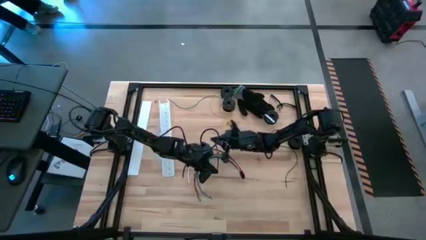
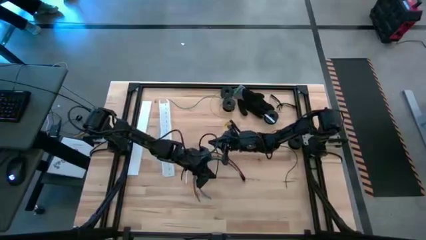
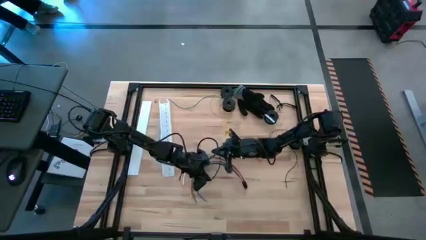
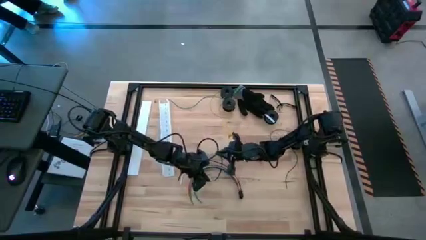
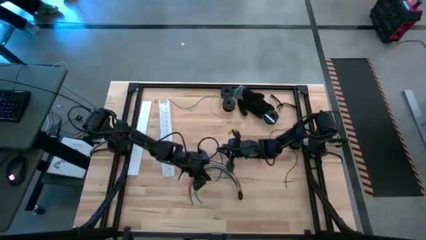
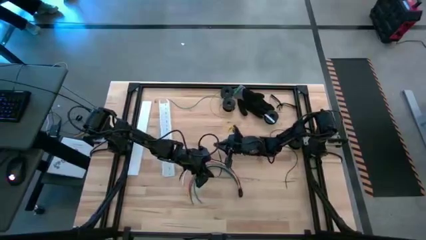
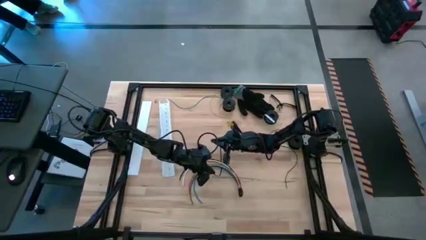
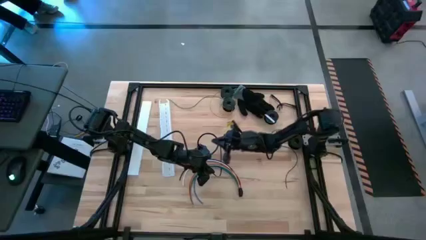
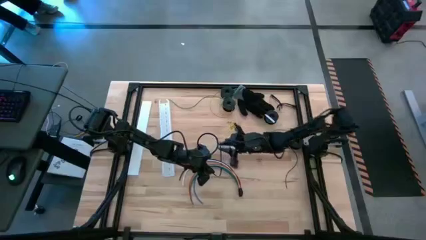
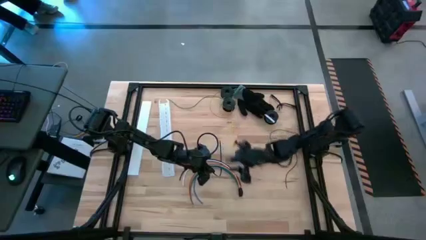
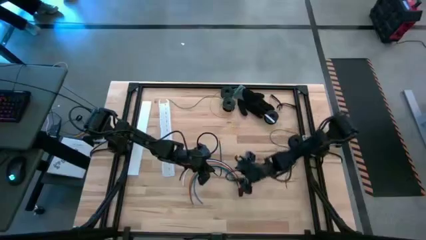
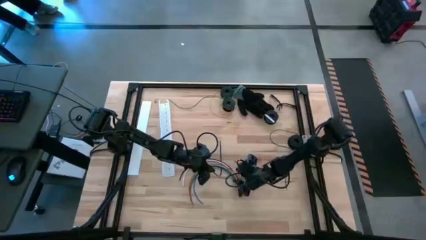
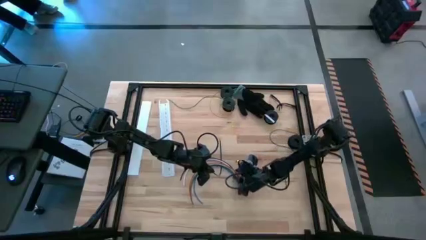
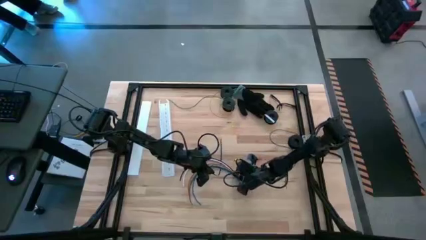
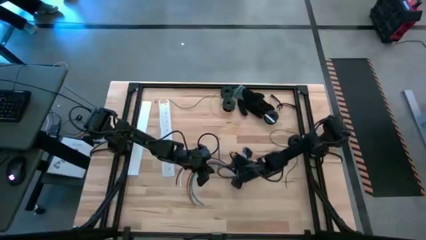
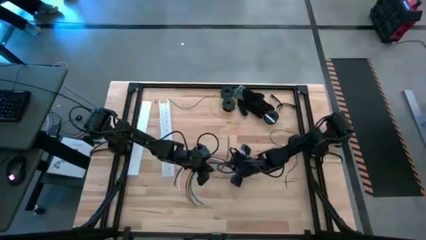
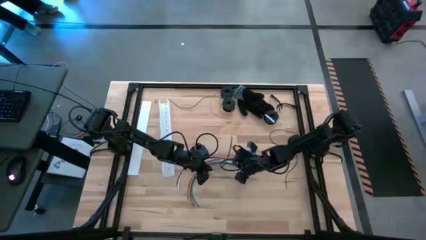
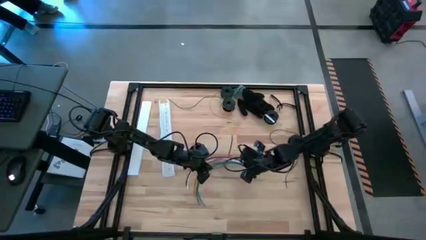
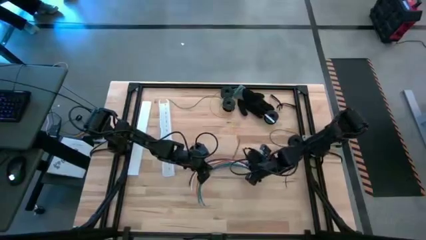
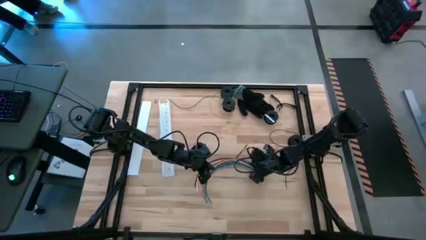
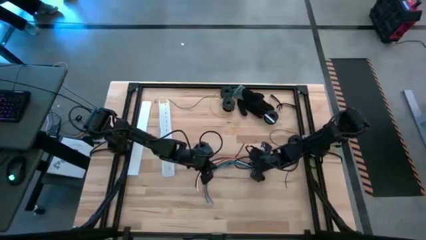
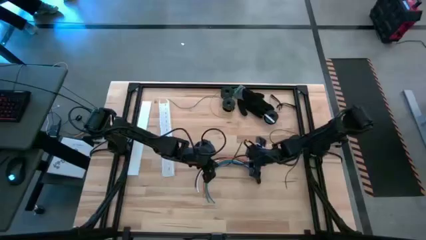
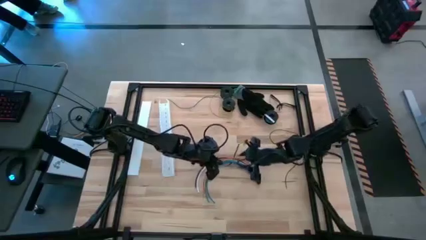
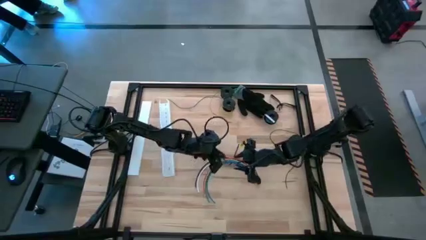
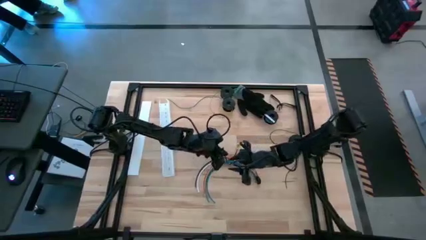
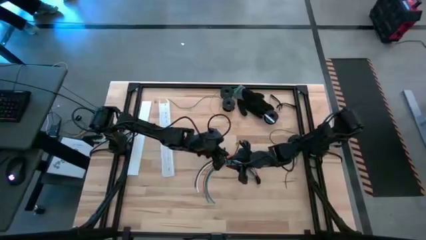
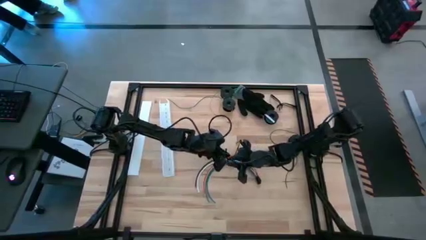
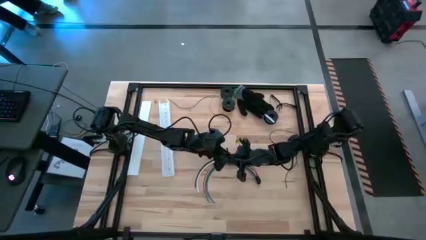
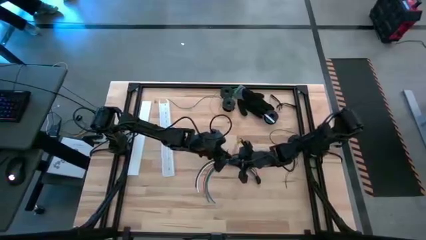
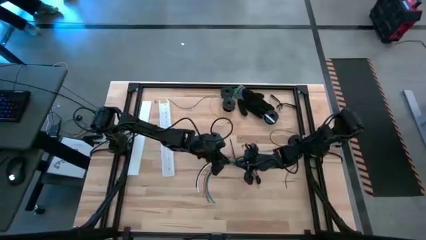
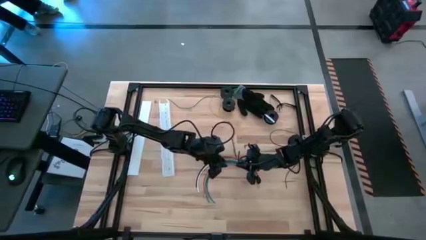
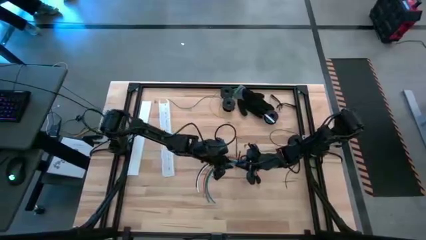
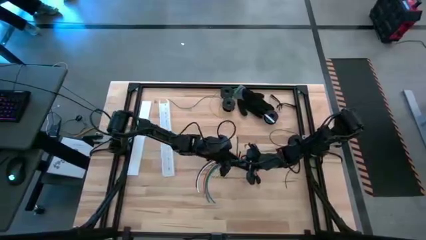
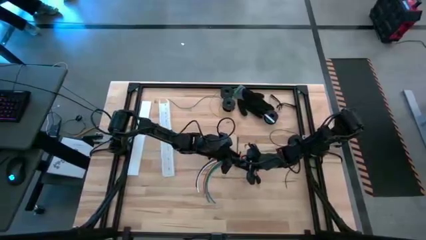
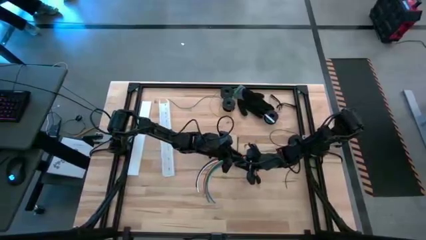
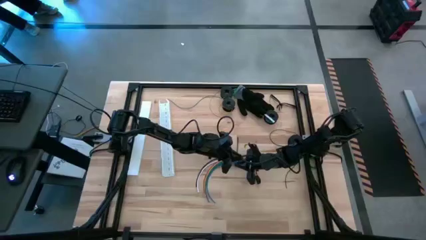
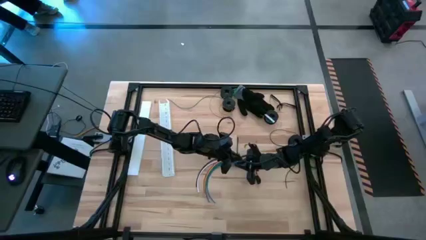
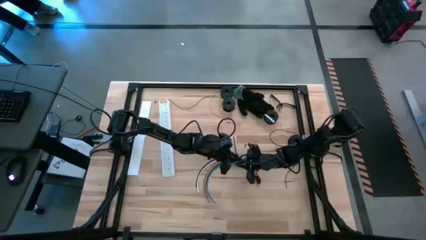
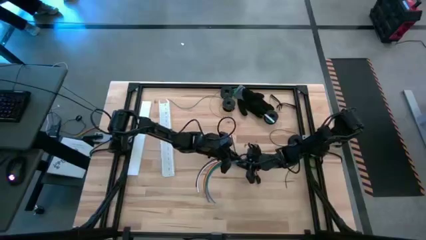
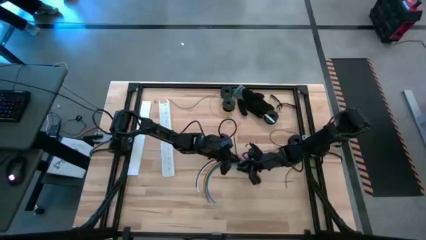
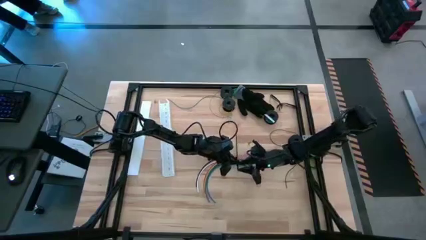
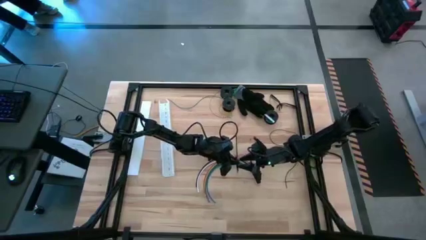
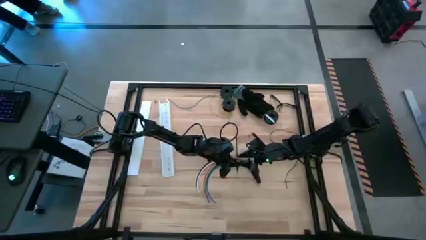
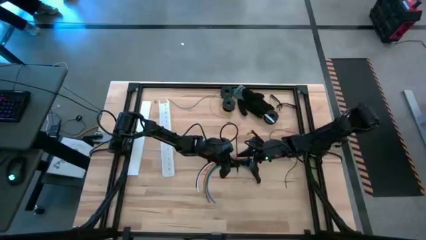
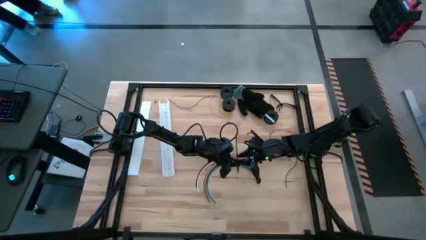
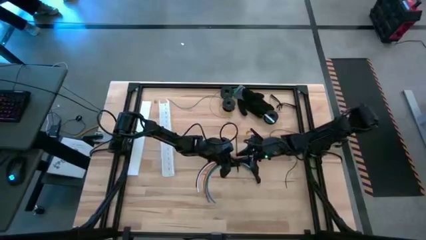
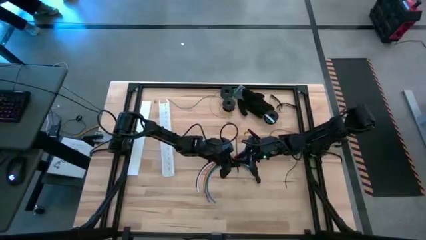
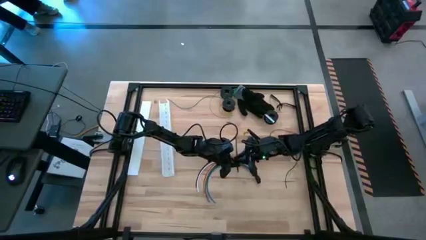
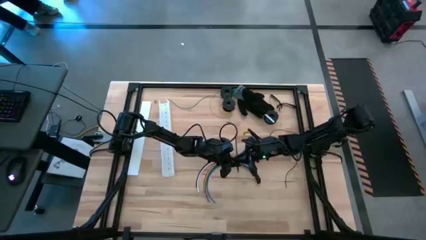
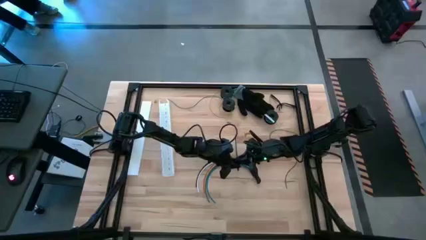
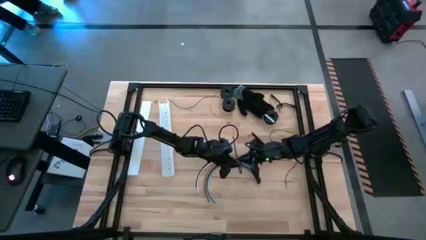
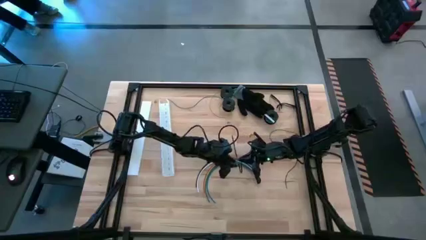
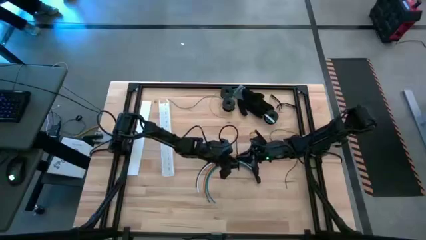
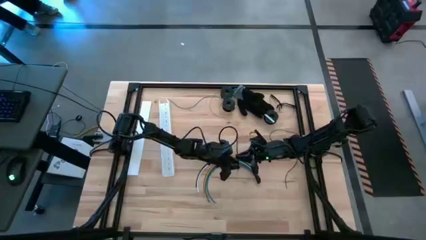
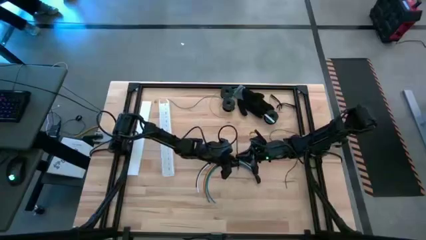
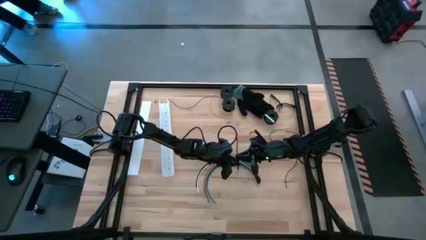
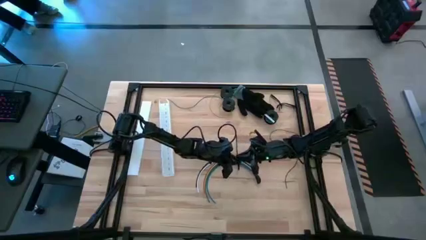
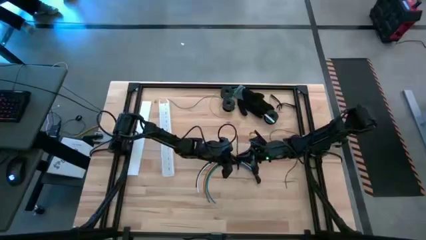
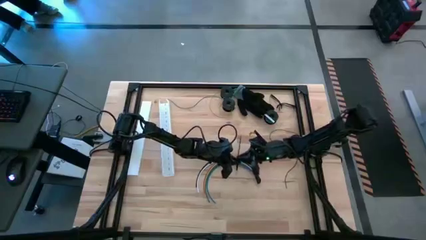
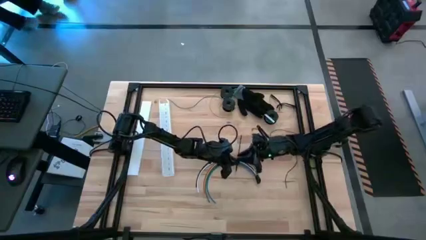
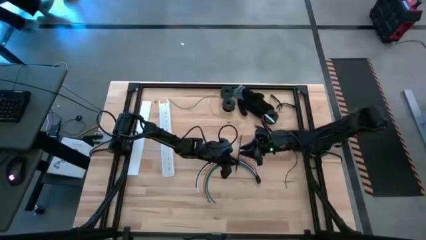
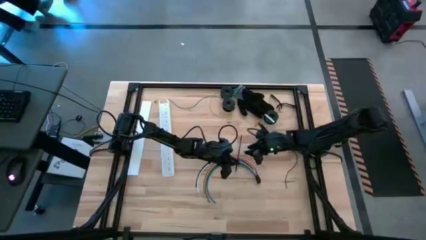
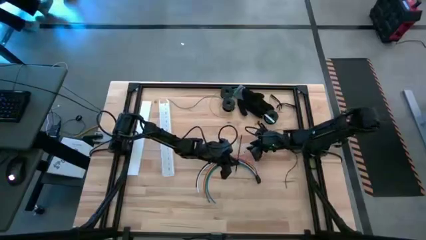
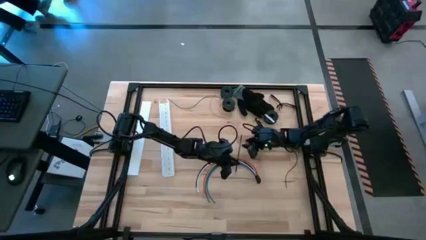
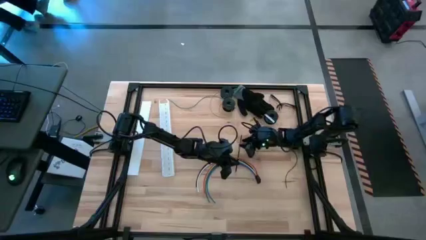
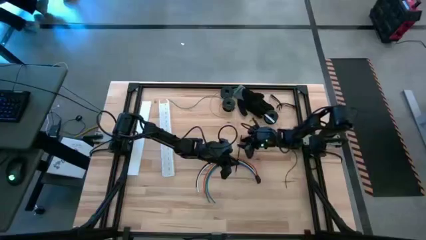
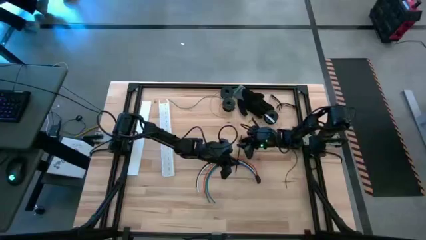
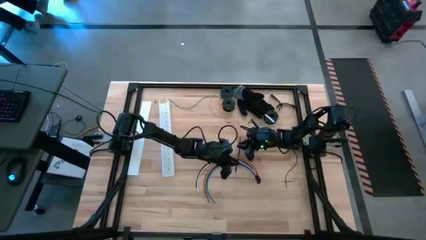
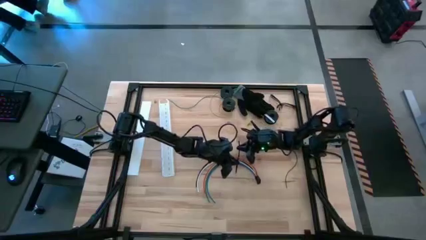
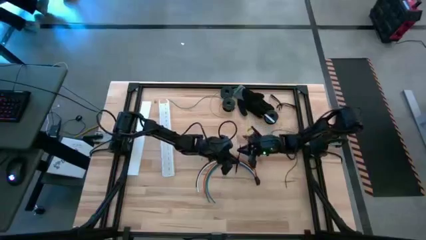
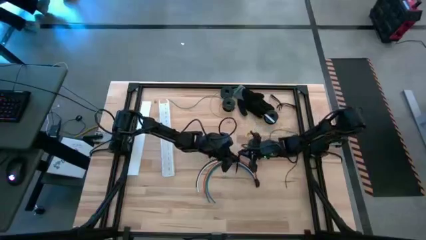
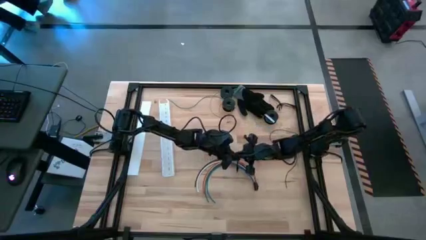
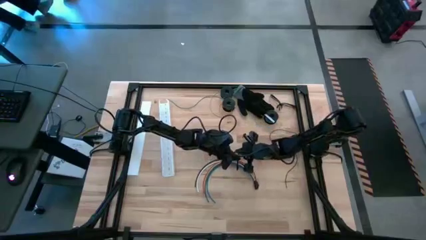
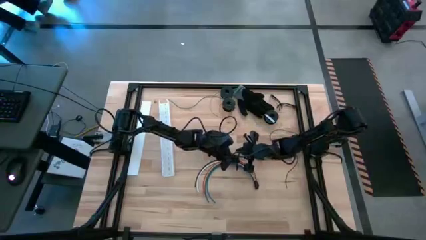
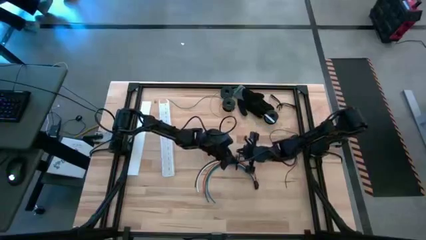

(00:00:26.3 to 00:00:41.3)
Task: Ziptie cables
Wrap the cables together using a black zip tie

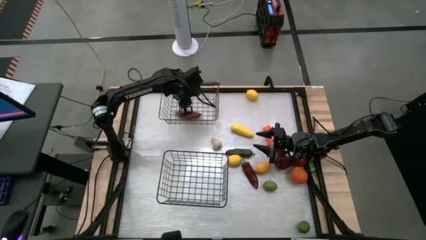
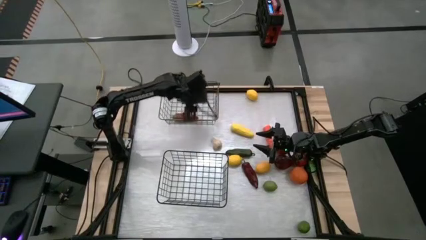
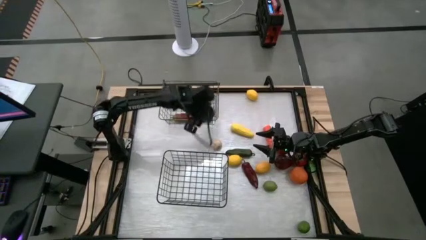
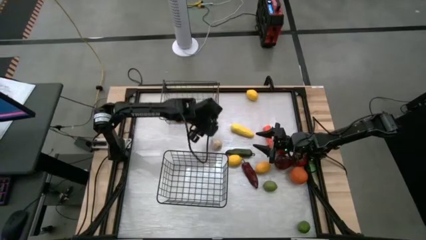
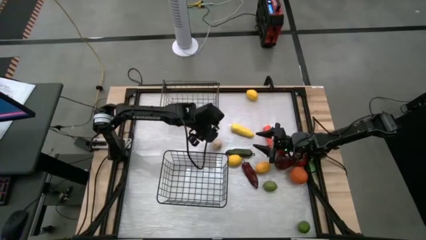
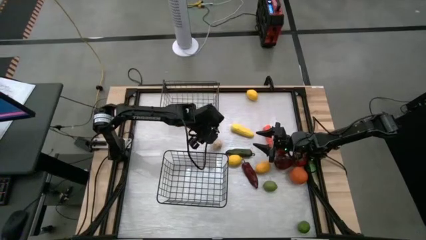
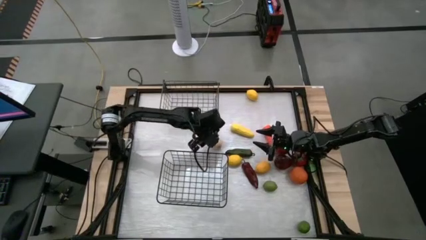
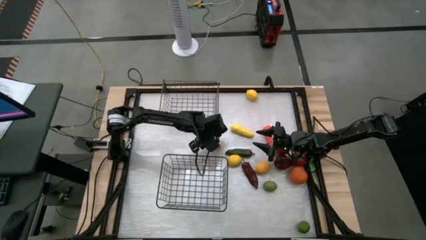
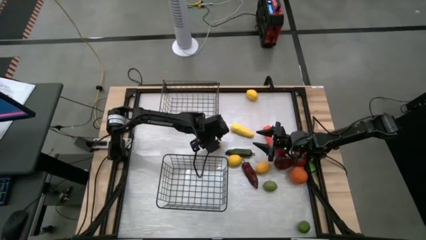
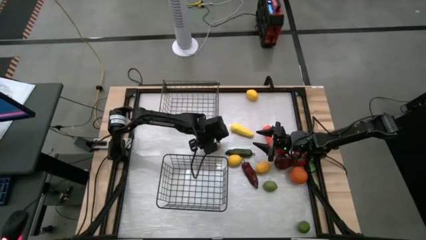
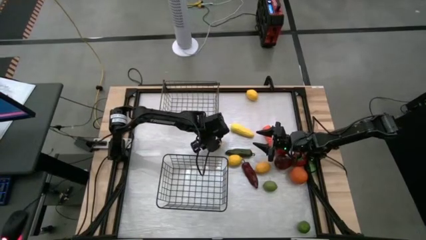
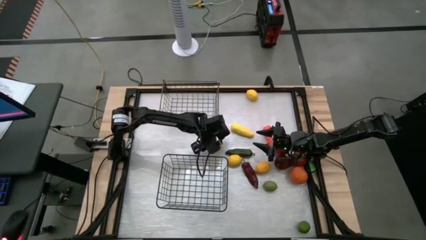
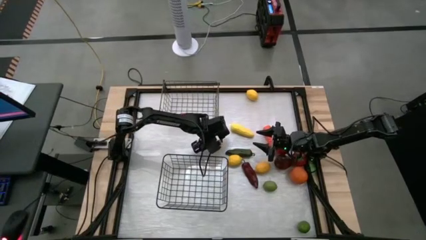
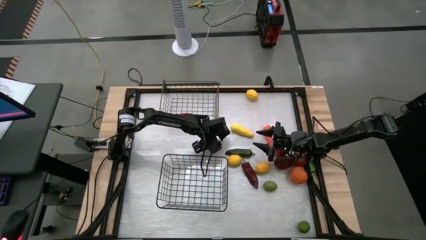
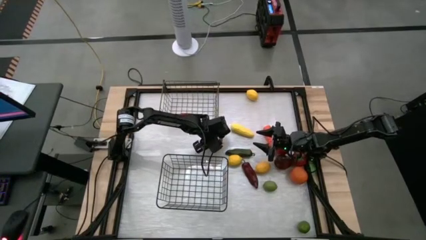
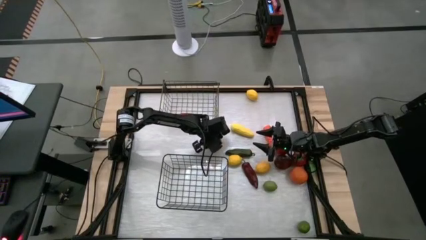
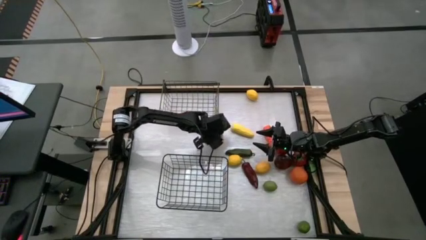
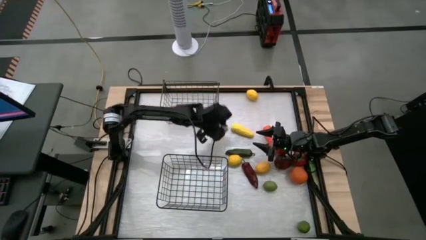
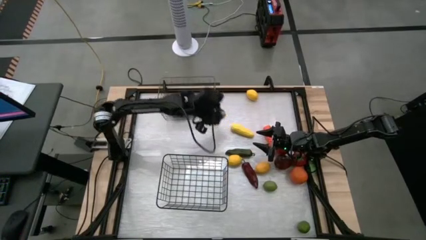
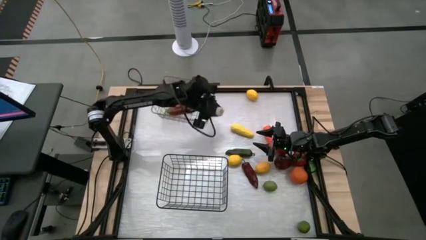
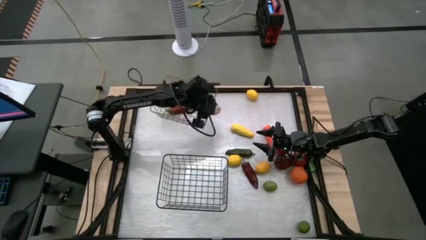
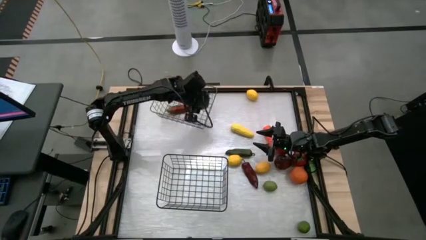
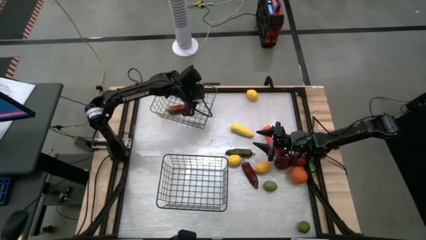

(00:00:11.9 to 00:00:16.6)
Task: Sort produce into baskets
Put the white garlic into the wire top basket
